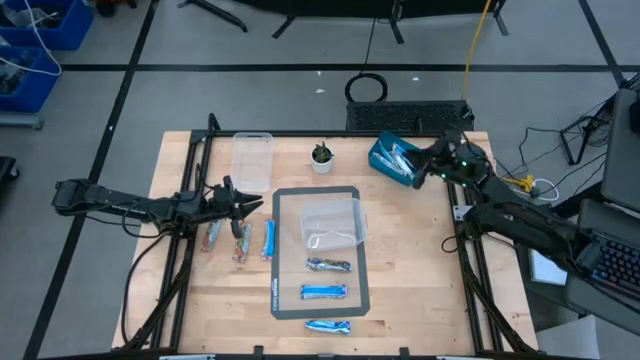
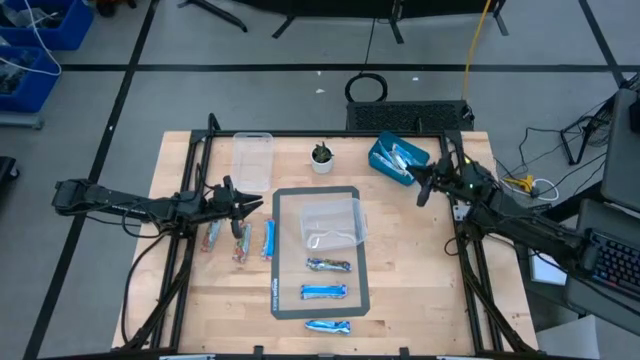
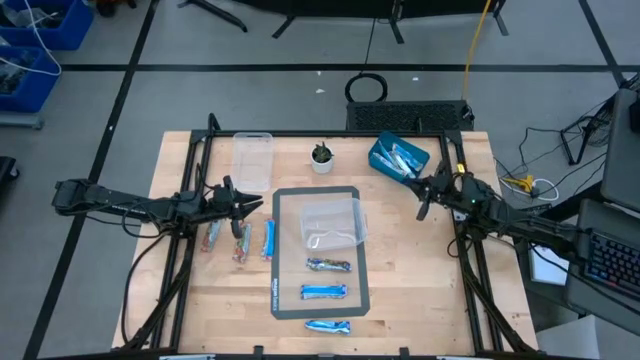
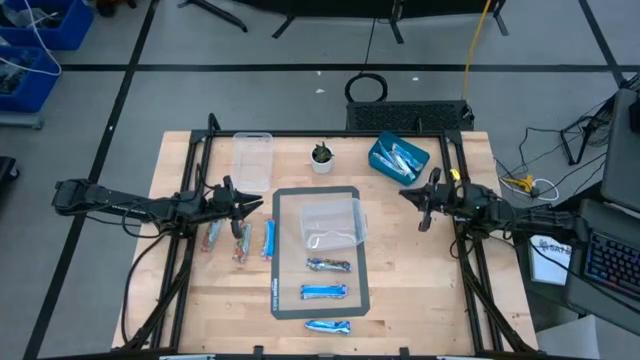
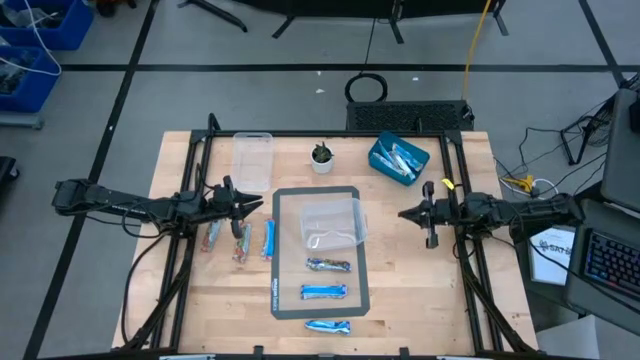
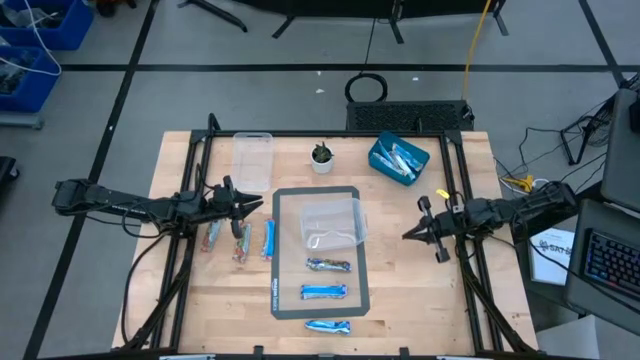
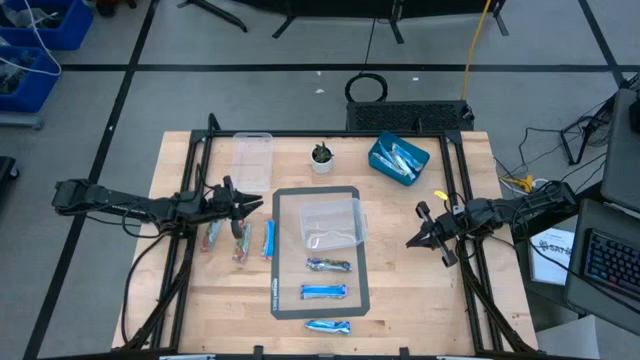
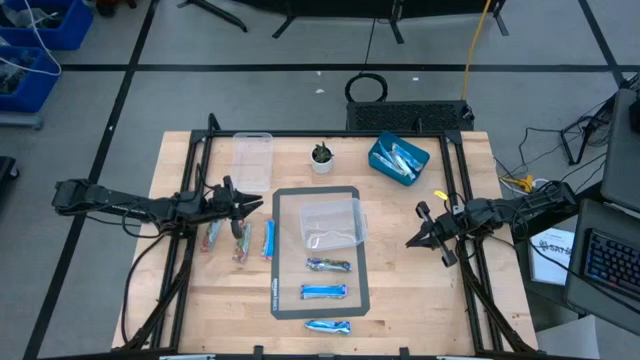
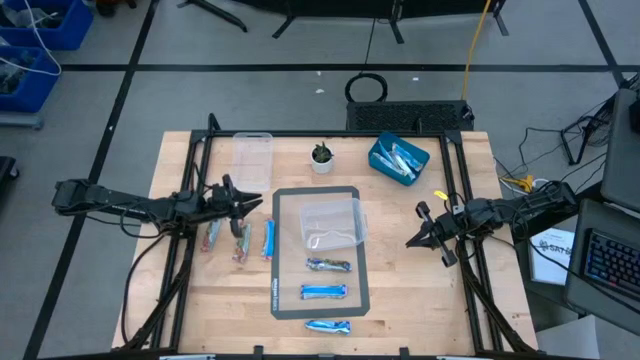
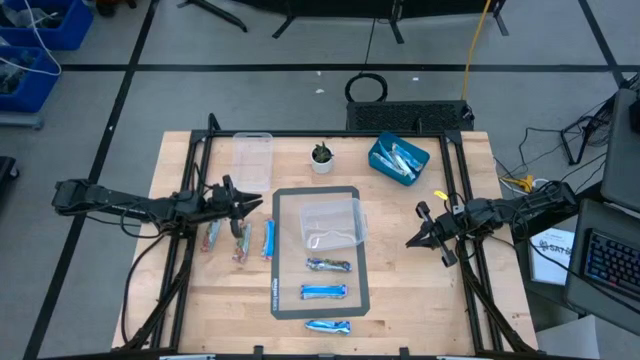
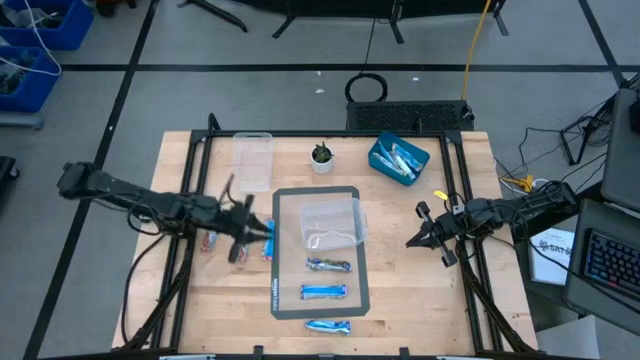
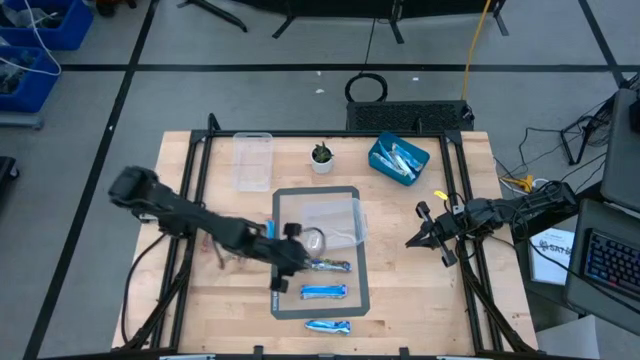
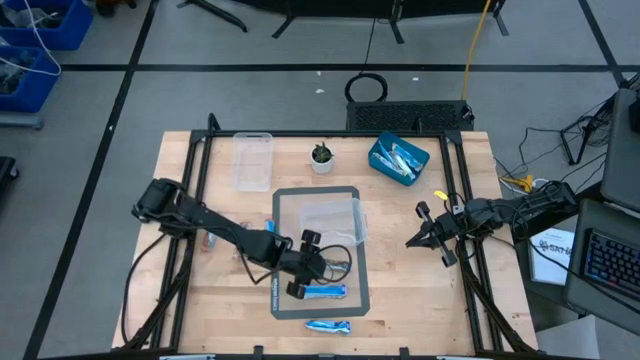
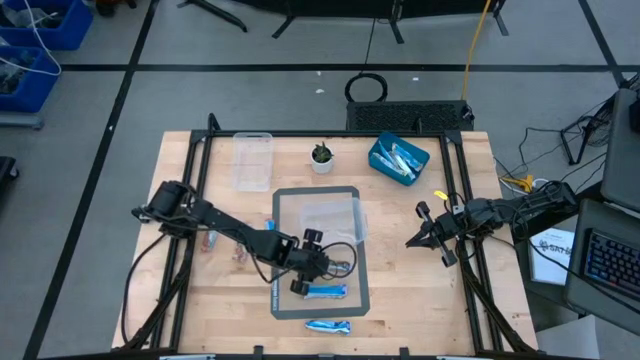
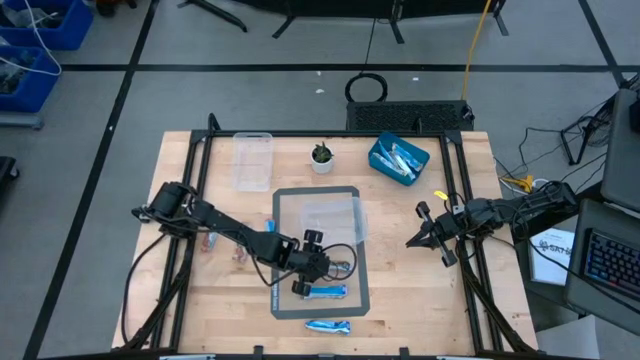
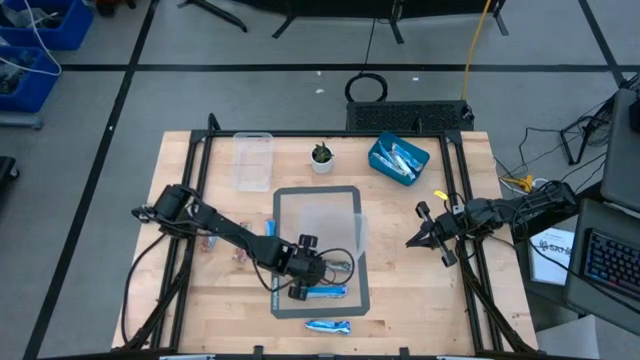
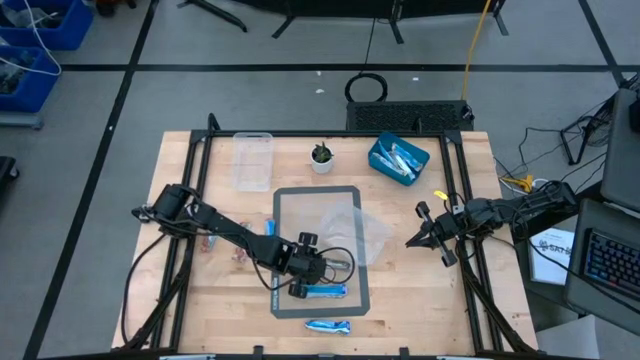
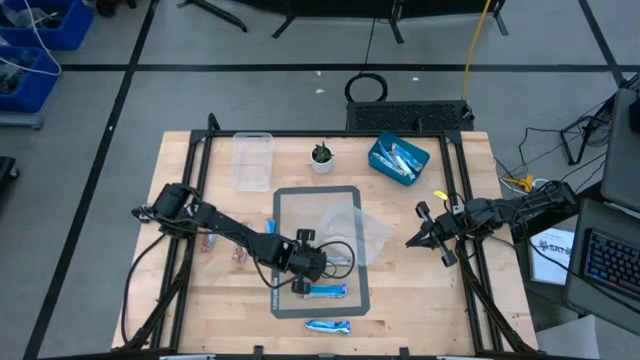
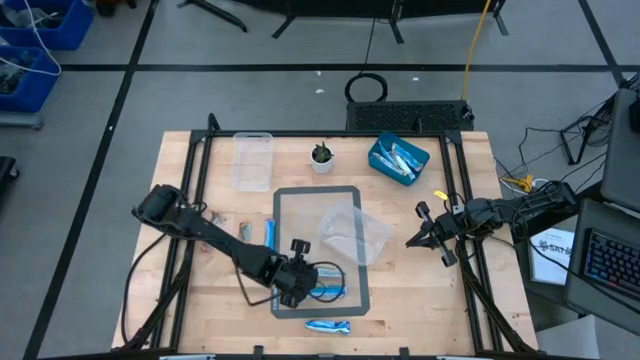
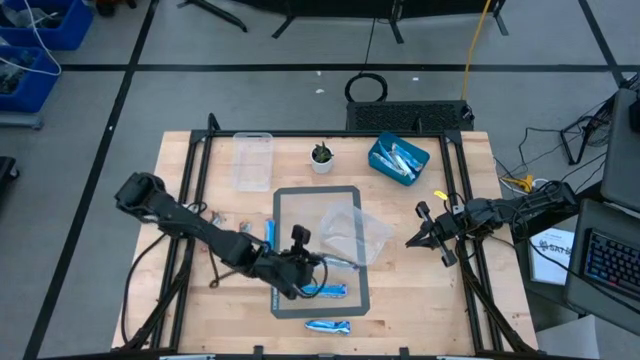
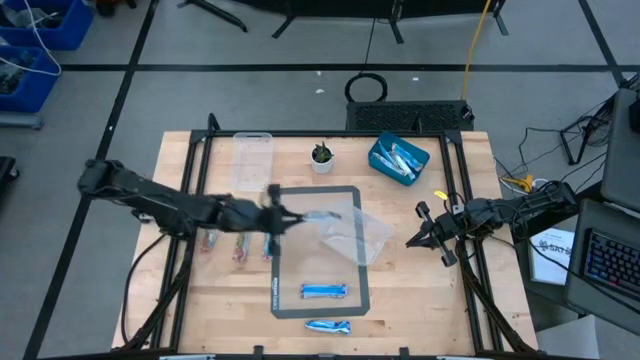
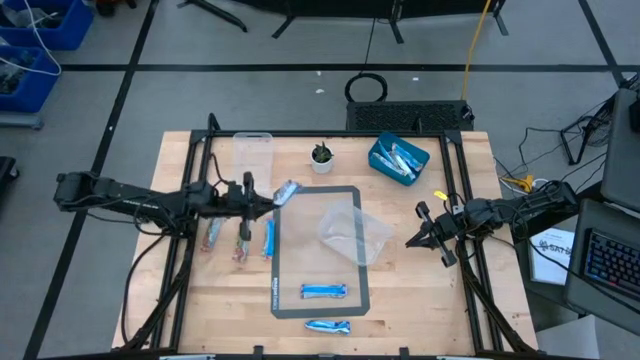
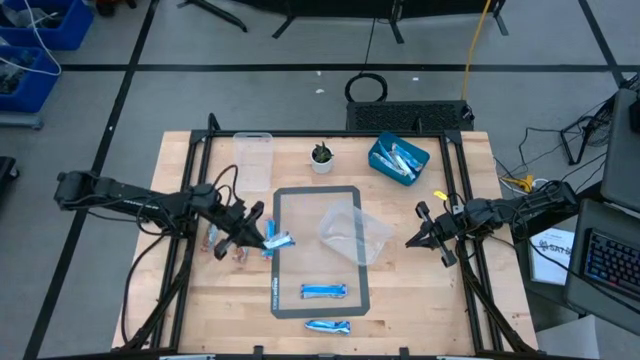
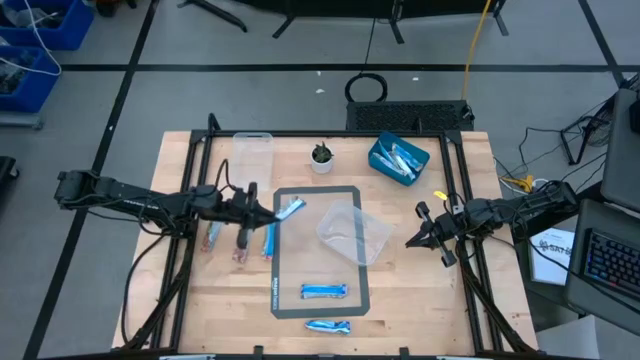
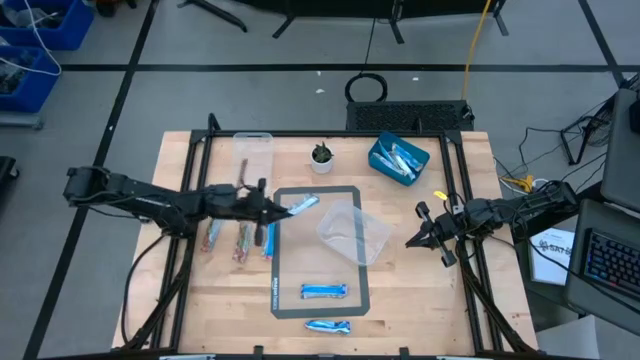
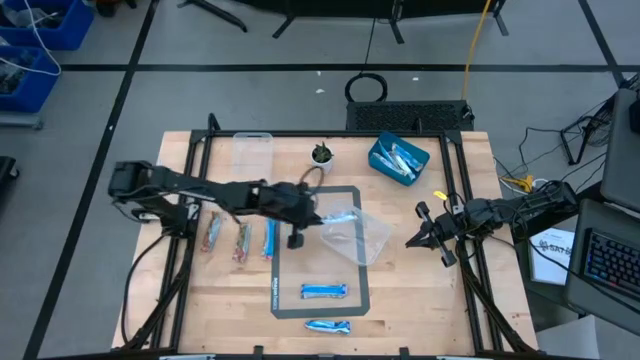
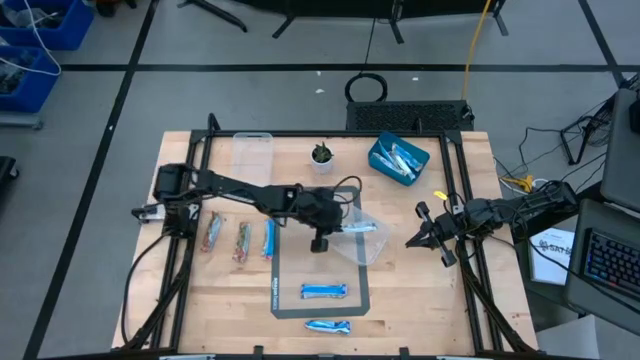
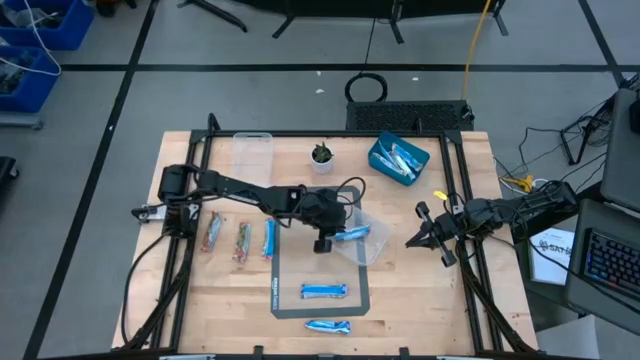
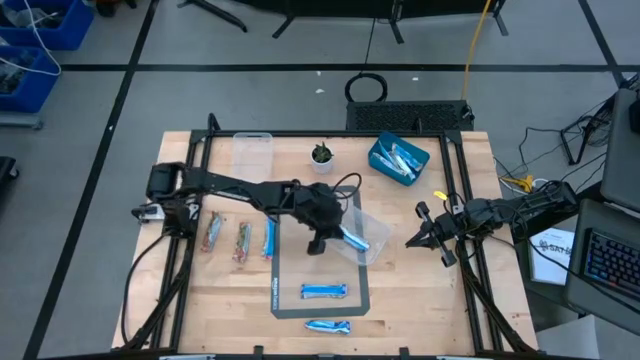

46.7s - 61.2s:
Task: Pick and place Granola Bars by type
Put the snack into the center bin

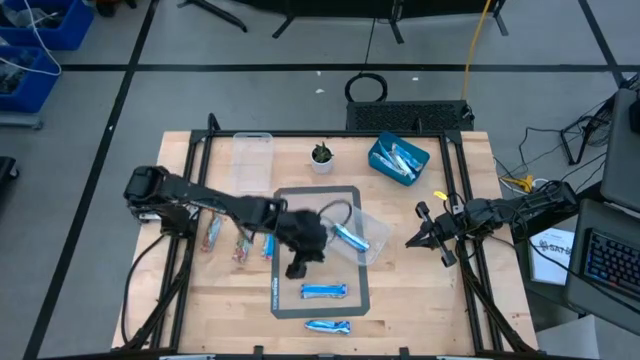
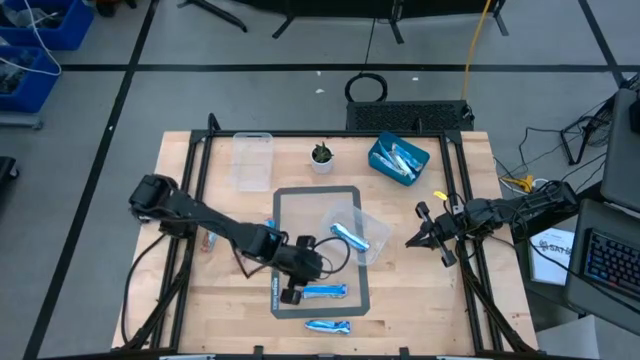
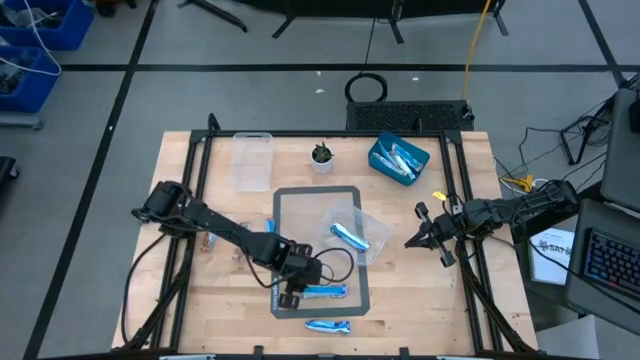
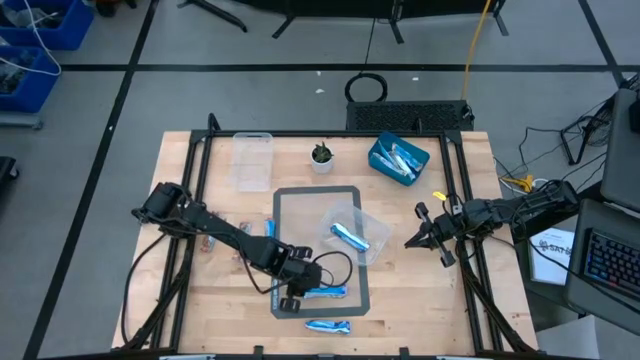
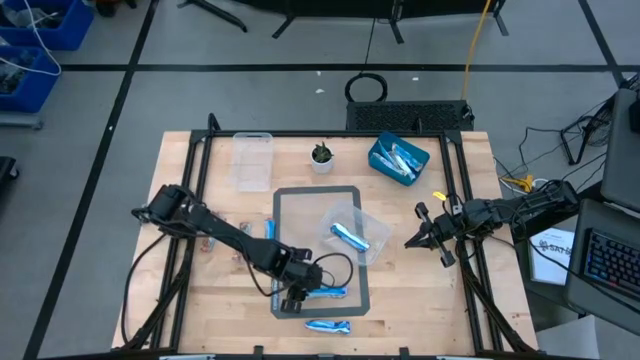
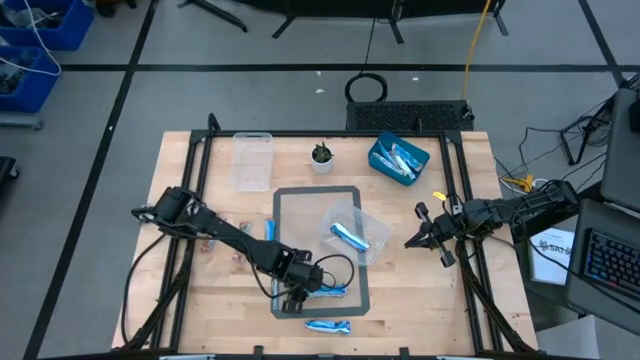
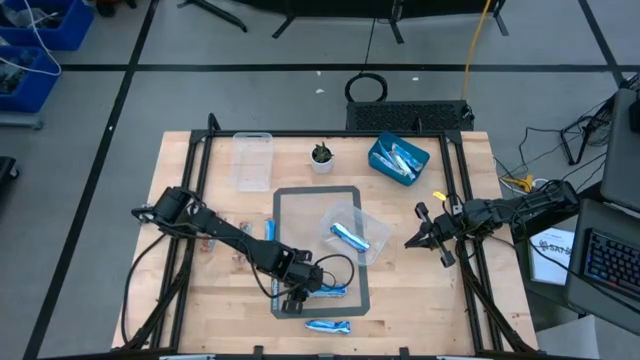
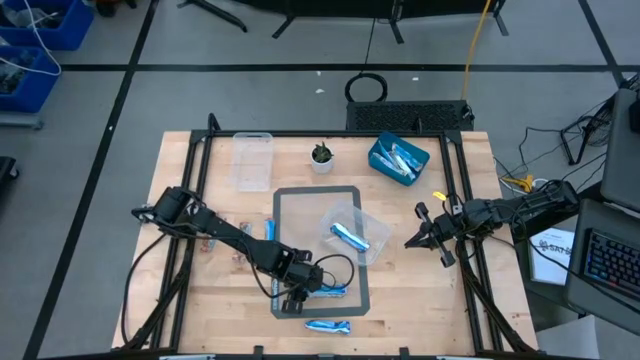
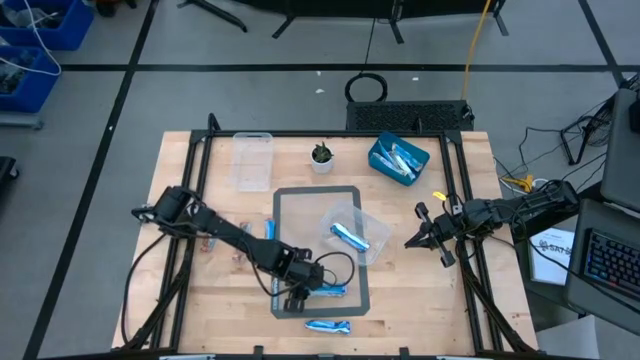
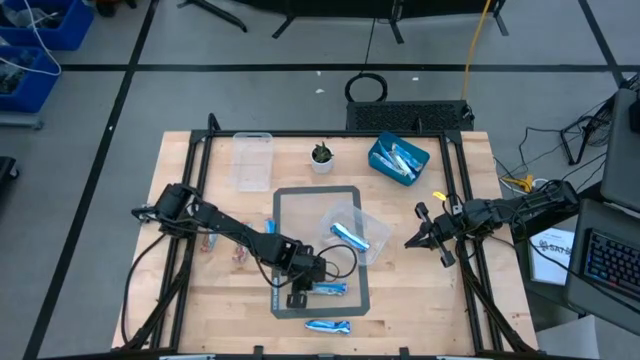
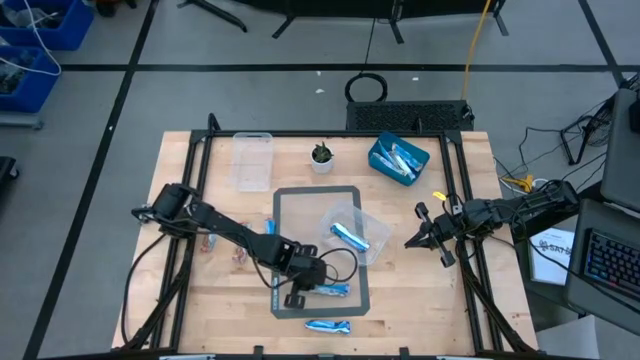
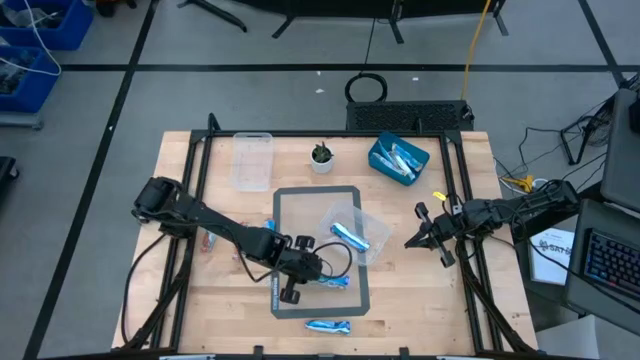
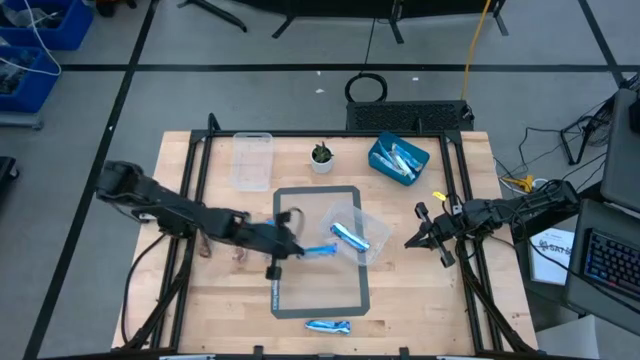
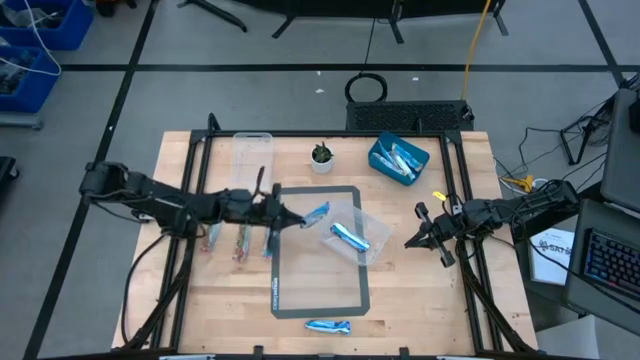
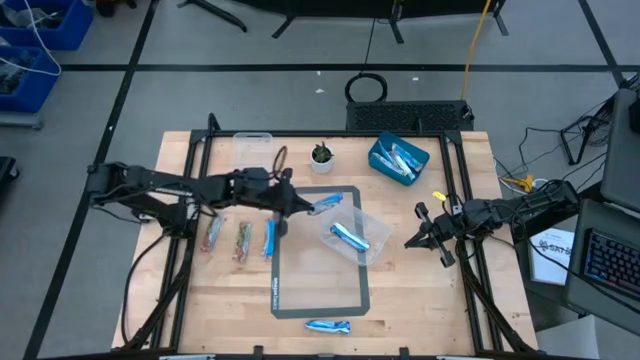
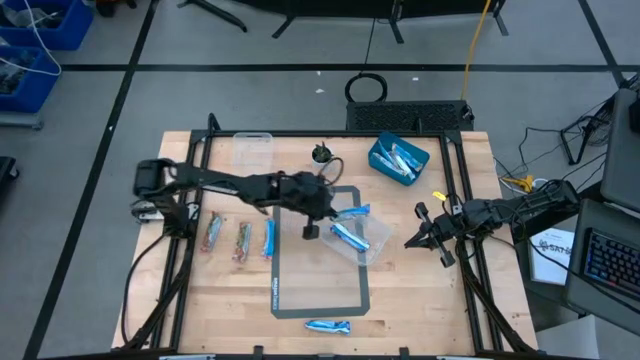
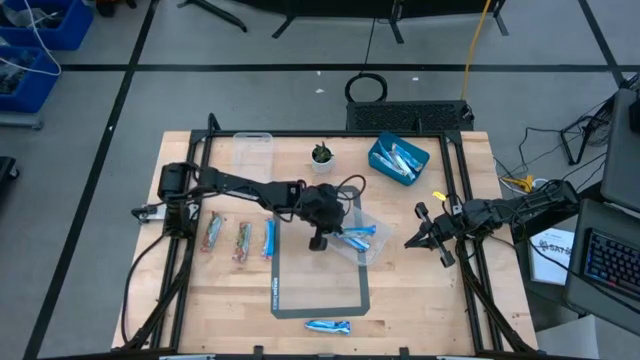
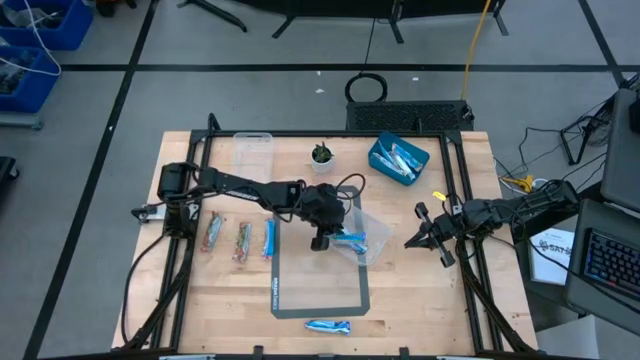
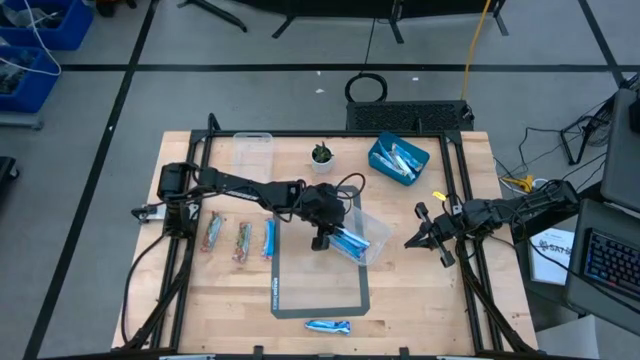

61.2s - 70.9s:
Put the snack into the center bin
